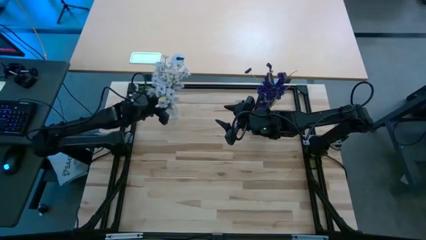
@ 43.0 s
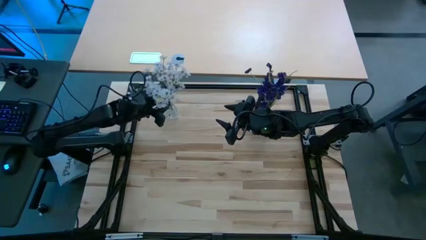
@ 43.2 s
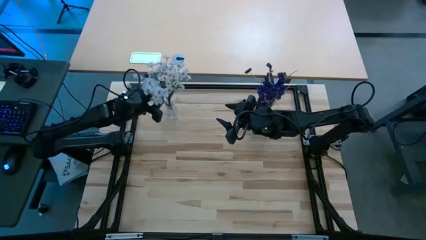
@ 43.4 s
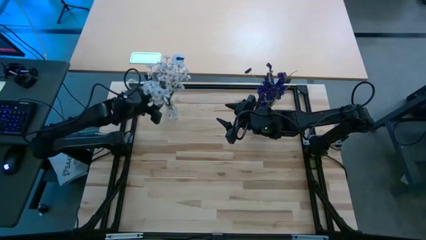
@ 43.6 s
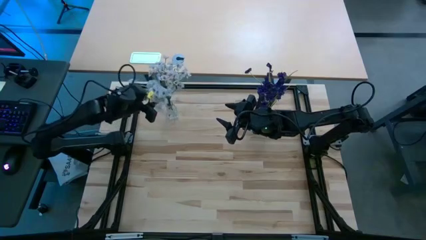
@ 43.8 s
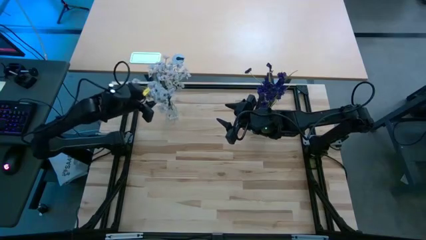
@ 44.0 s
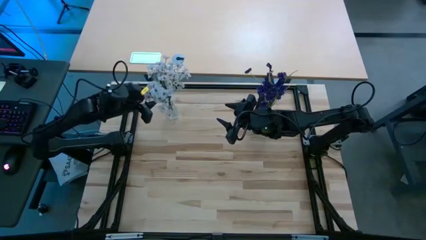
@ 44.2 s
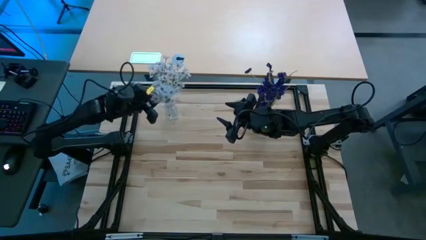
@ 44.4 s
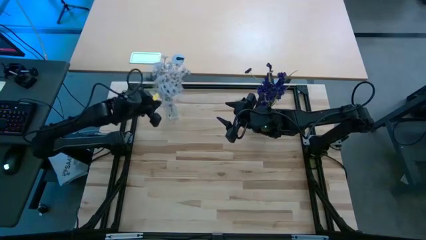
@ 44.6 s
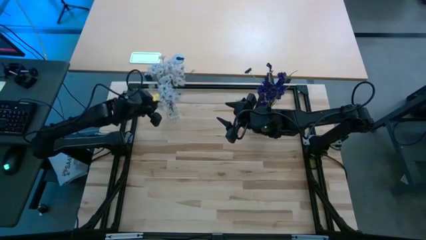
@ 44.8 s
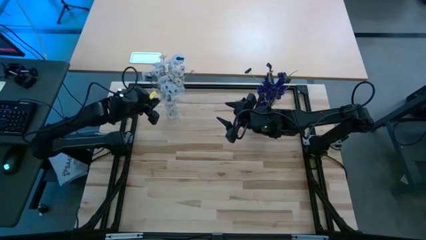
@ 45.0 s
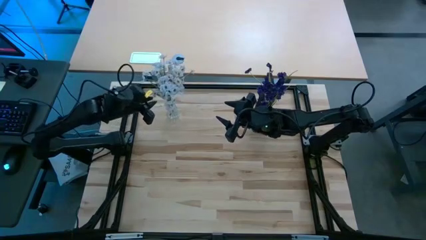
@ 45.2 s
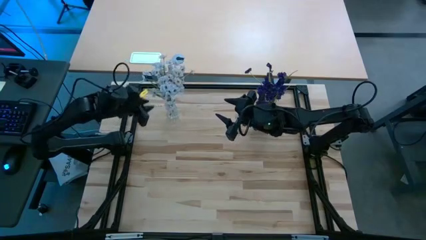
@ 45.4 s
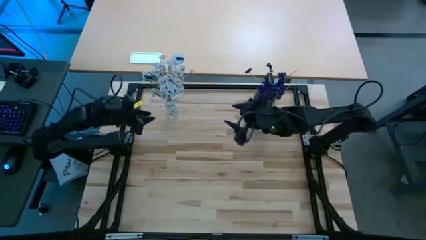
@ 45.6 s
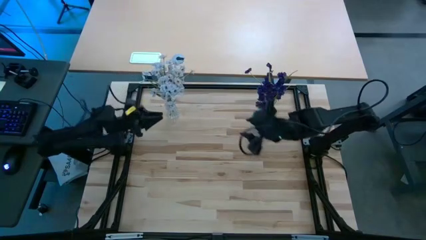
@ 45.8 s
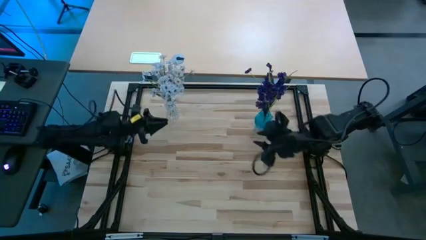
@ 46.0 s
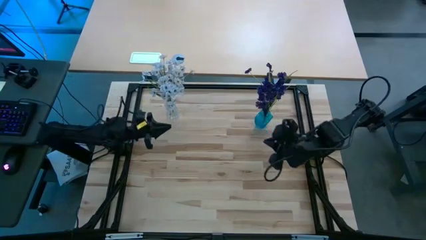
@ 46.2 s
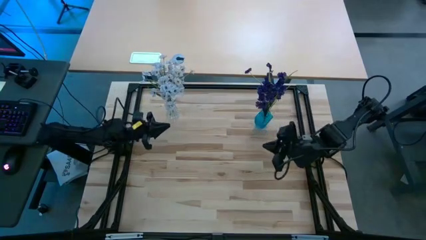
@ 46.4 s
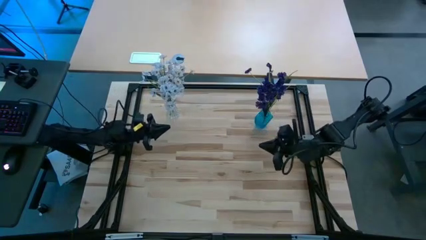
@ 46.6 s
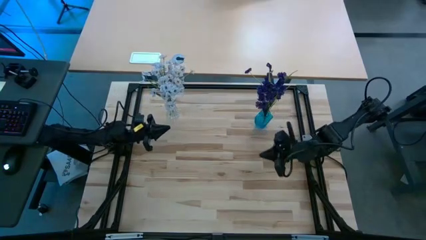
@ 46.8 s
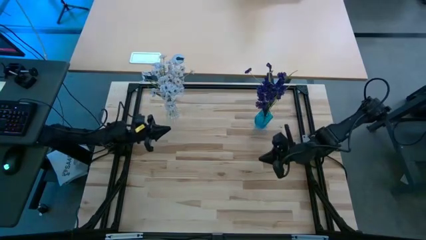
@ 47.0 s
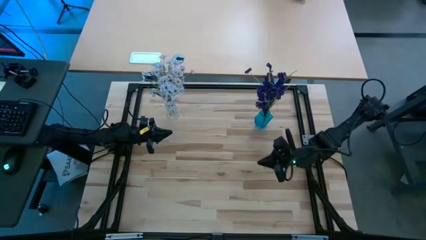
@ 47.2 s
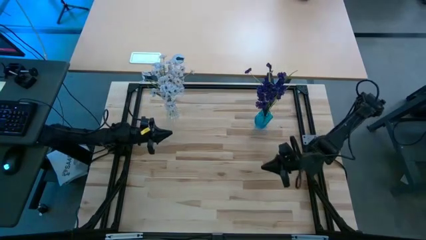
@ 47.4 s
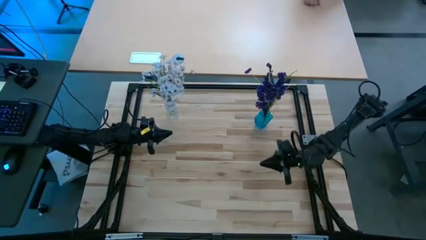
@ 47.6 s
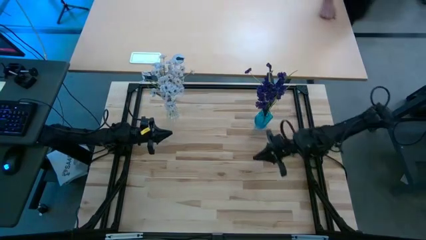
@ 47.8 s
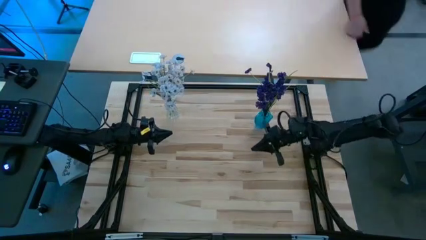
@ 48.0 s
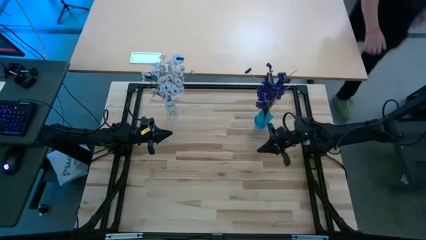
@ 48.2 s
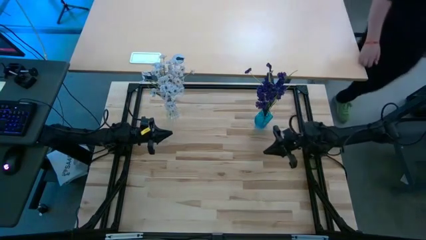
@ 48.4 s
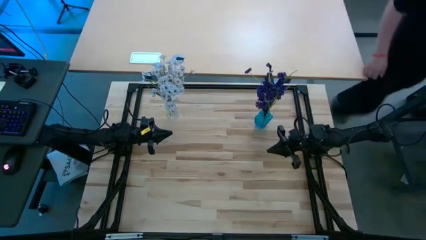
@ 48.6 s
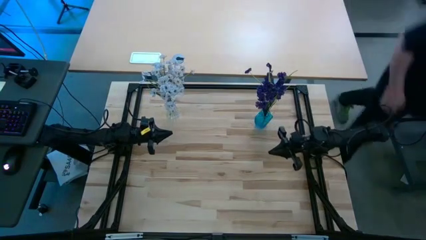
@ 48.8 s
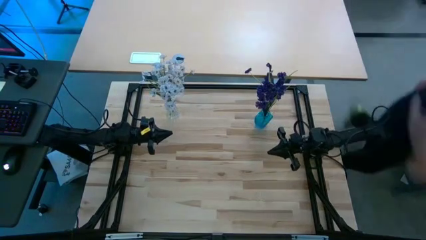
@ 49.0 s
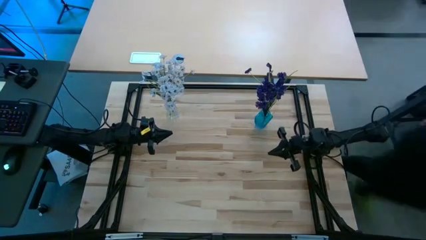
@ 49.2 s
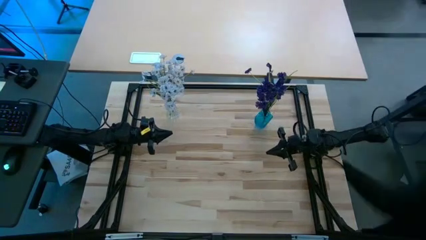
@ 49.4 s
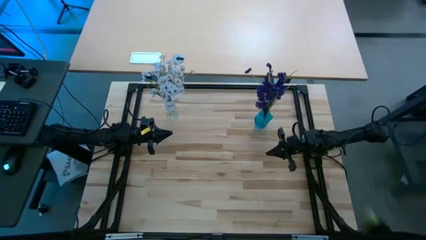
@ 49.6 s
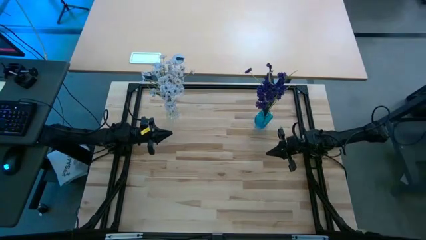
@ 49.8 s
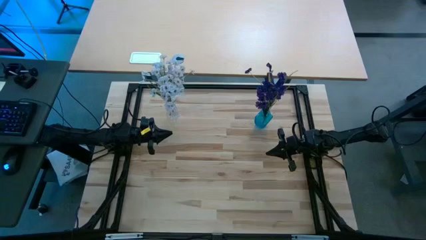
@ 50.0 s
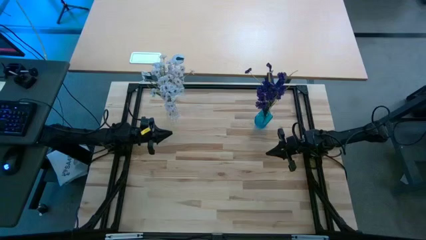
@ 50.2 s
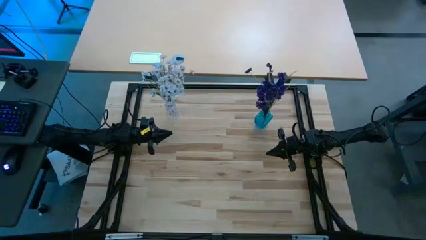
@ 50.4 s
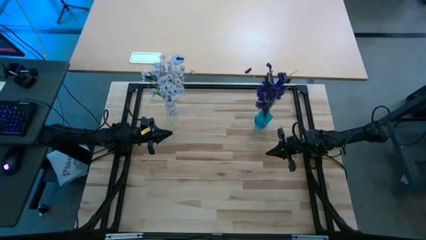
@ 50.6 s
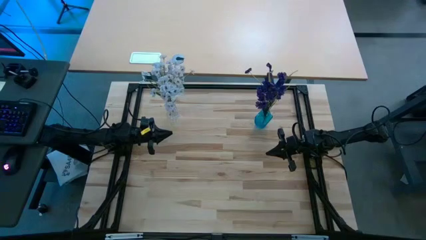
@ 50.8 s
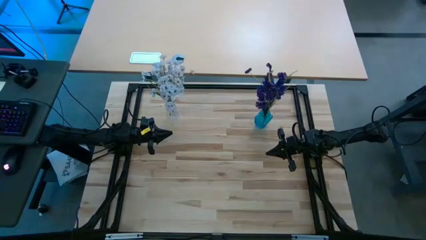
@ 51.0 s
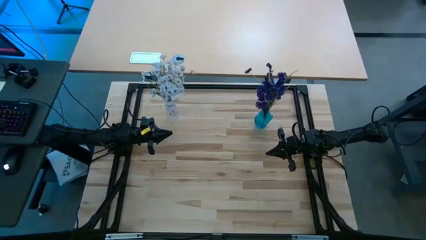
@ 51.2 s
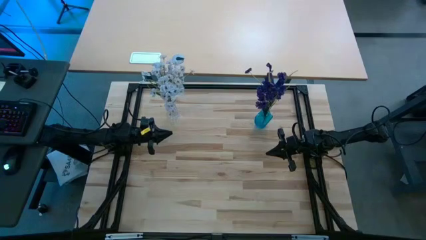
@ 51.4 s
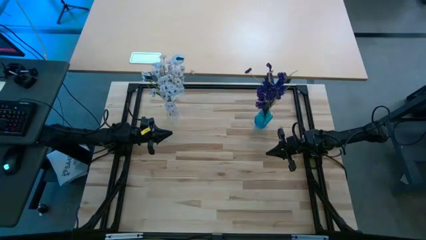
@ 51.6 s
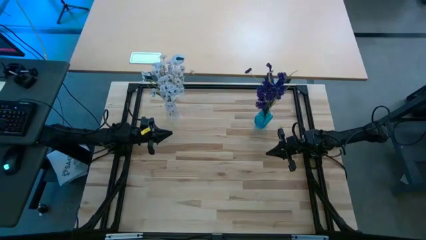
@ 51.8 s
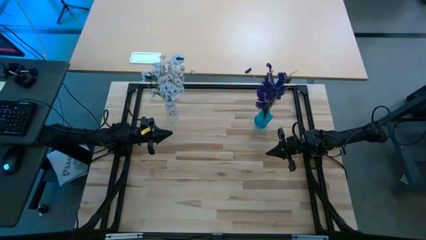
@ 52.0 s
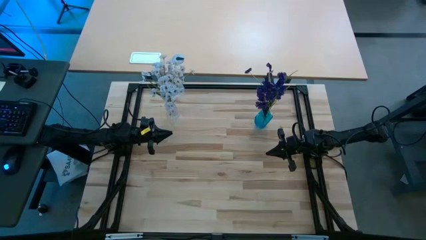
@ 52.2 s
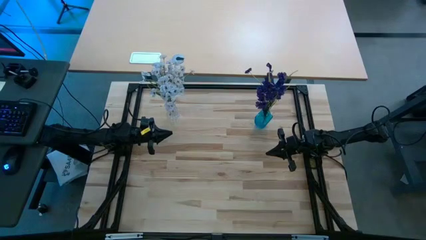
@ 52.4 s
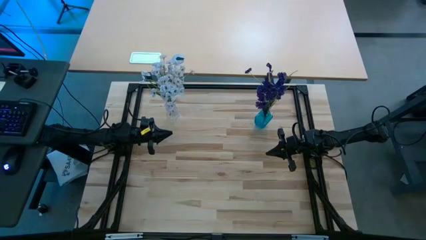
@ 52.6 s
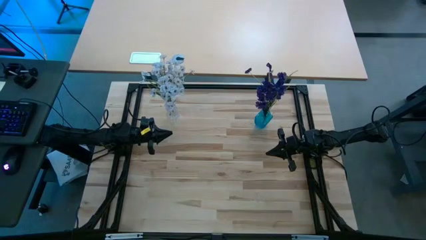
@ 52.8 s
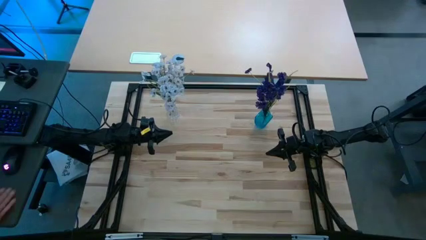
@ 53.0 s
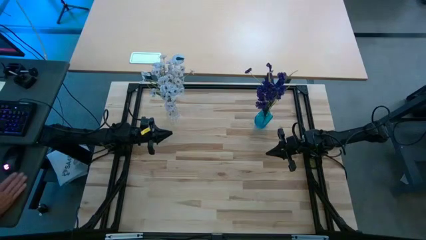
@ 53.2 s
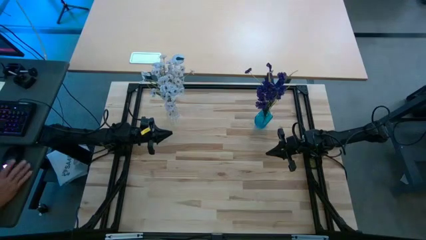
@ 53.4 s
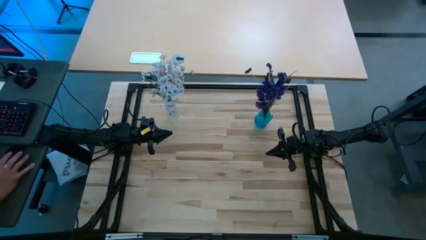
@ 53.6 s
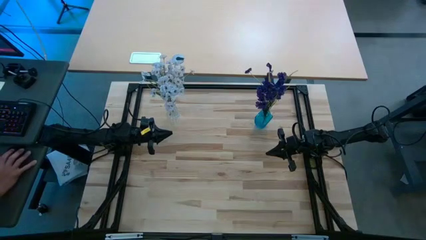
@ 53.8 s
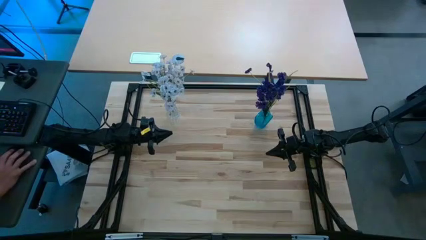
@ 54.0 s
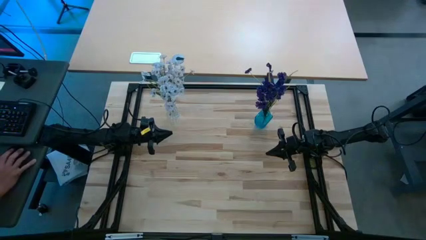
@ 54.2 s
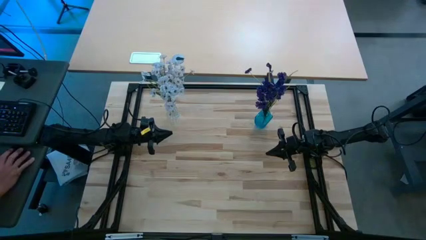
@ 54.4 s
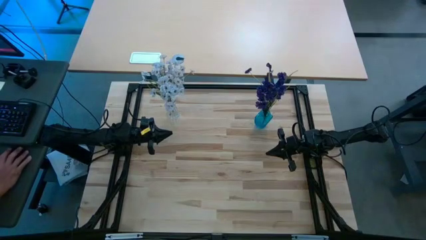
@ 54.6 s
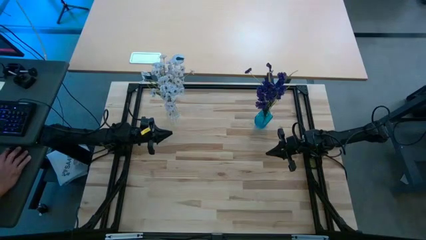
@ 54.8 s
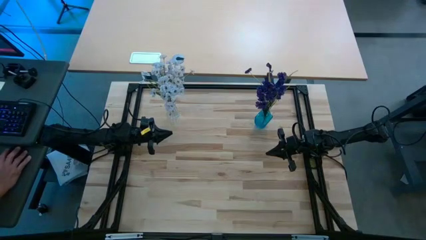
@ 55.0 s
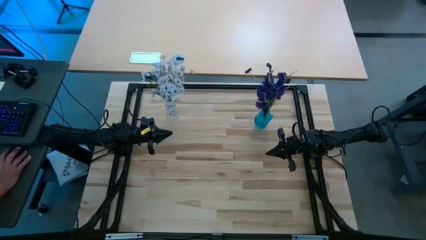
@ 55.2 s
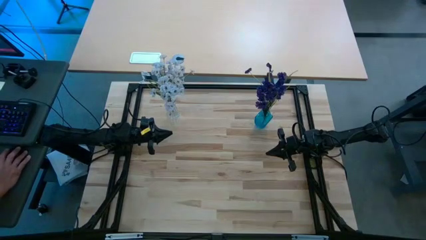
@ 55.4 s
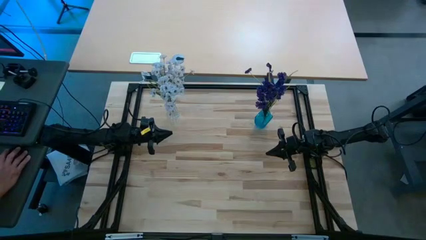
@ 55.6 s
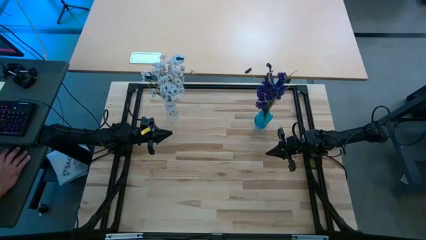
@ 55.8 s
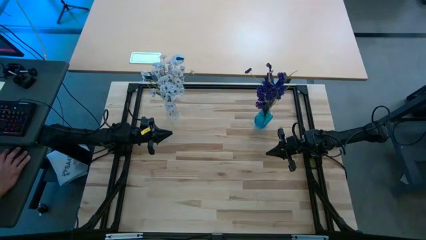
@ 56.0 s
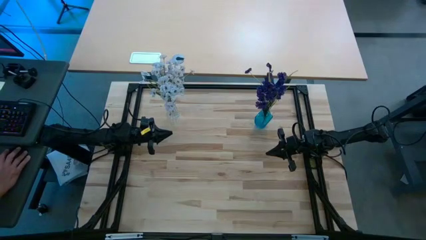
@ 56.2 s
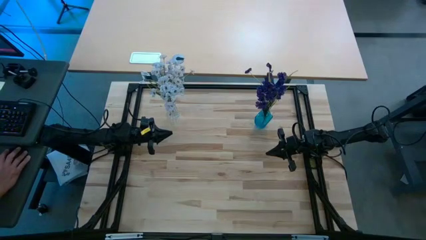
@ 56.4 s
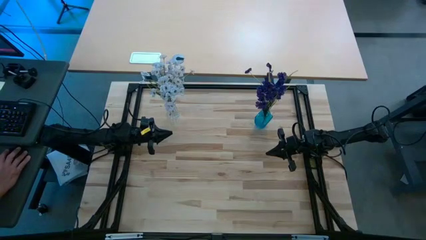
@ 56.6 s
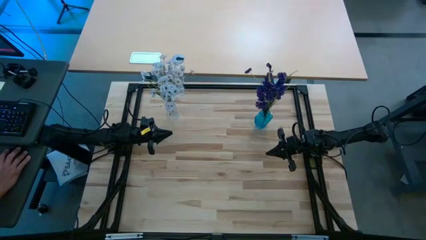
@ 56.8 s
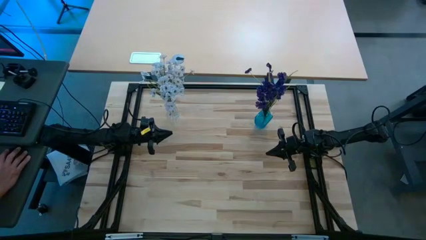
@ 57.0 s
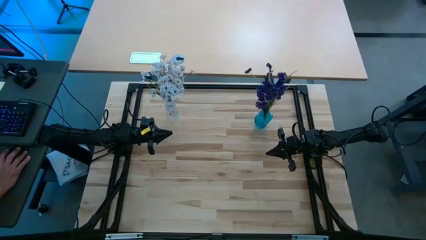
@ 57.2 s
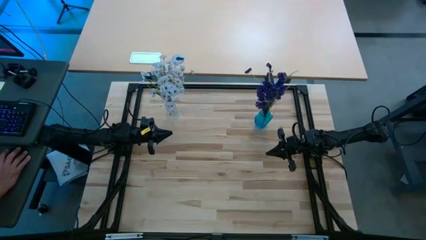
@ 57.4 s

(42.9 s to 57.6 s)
Task: Sort flowers into vase by color
Return to Home Position
